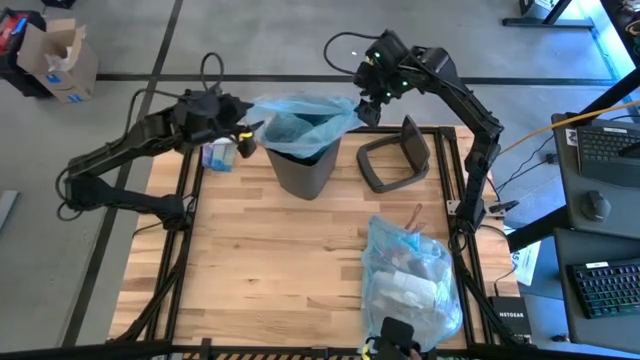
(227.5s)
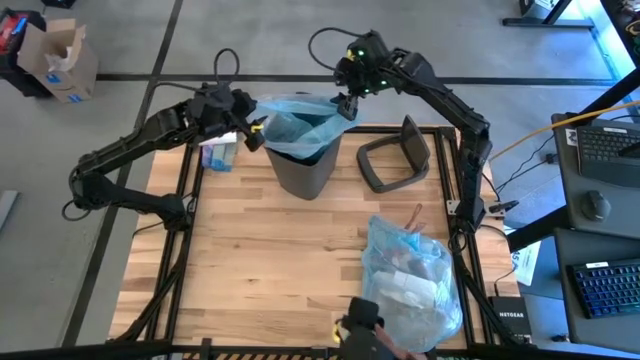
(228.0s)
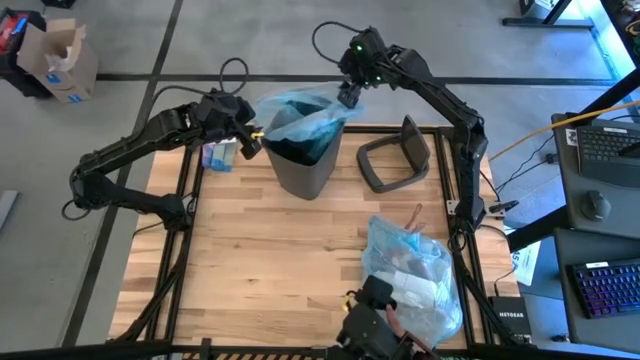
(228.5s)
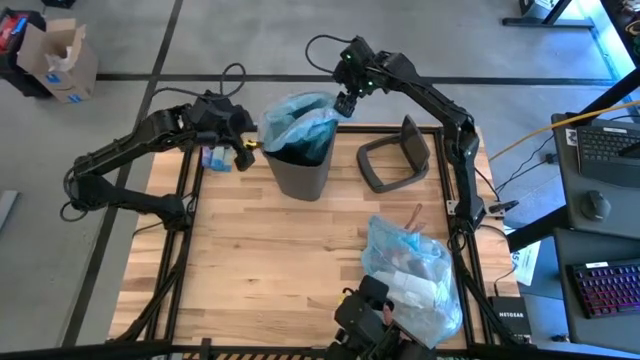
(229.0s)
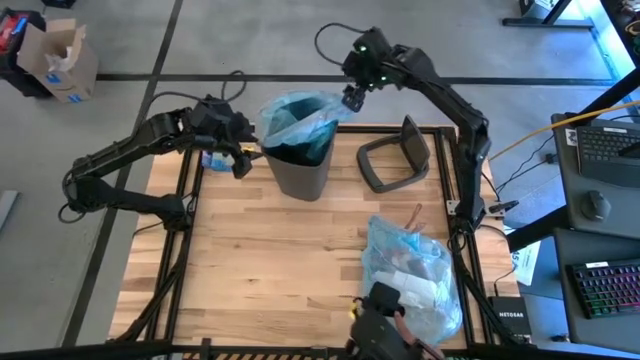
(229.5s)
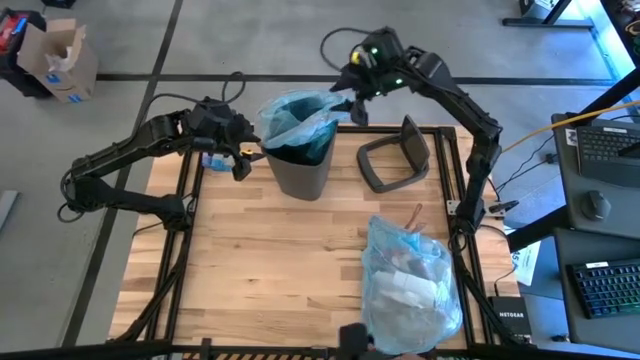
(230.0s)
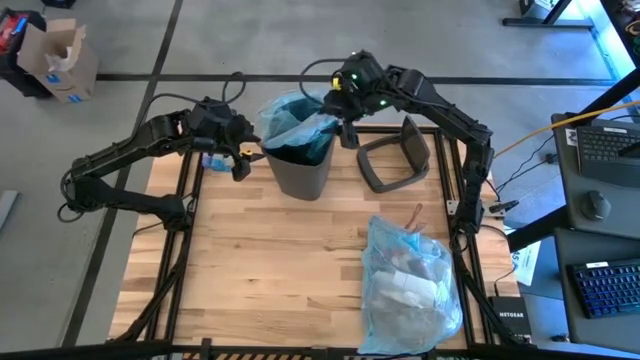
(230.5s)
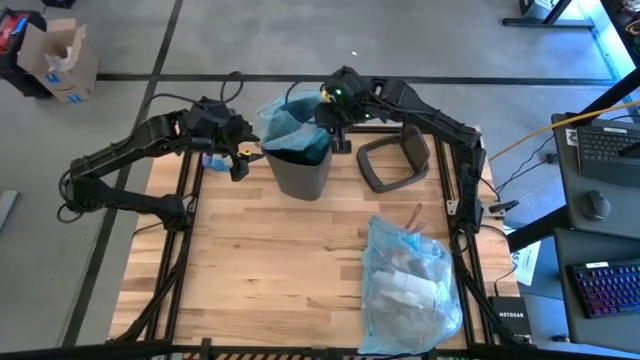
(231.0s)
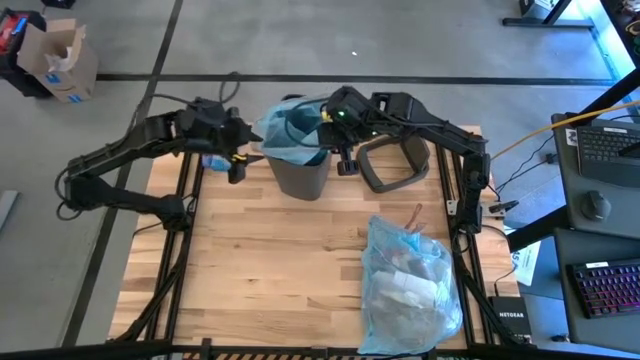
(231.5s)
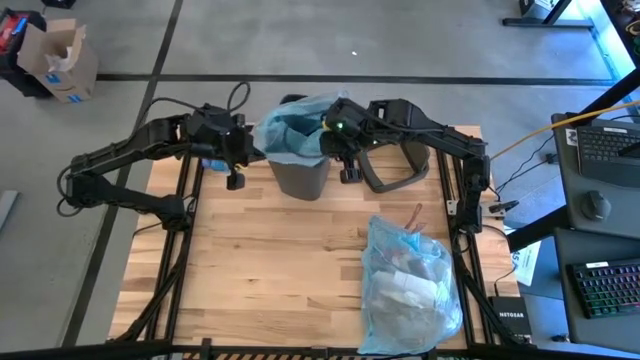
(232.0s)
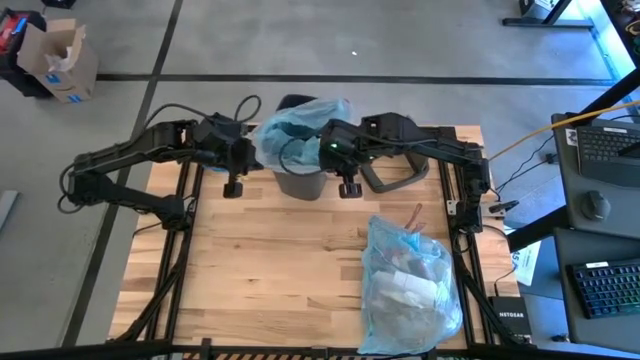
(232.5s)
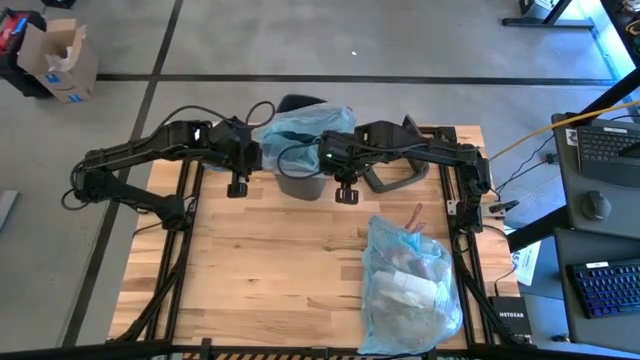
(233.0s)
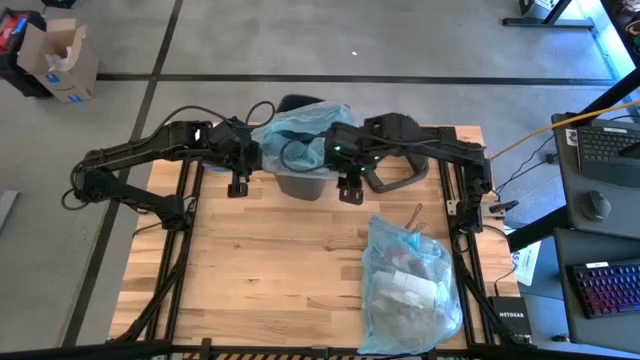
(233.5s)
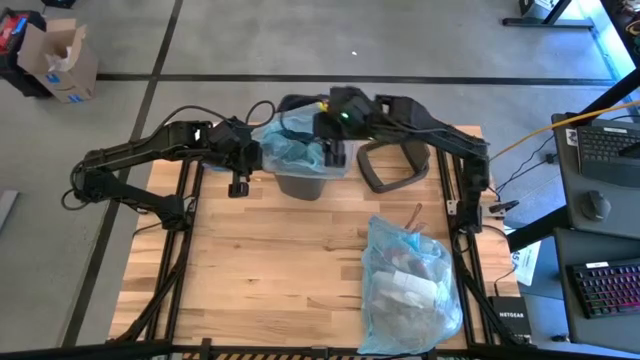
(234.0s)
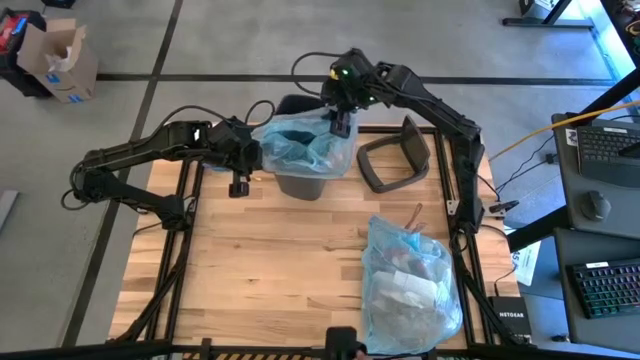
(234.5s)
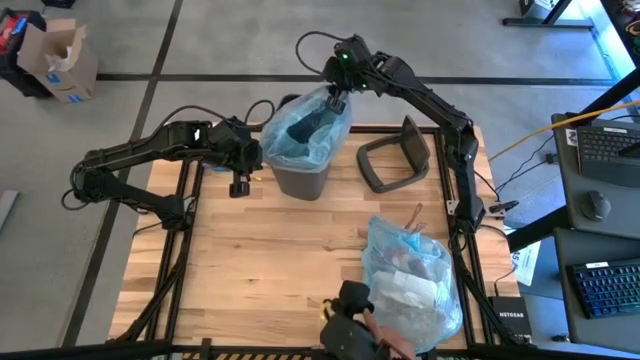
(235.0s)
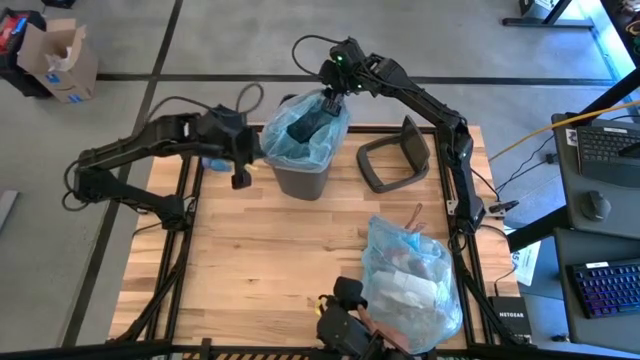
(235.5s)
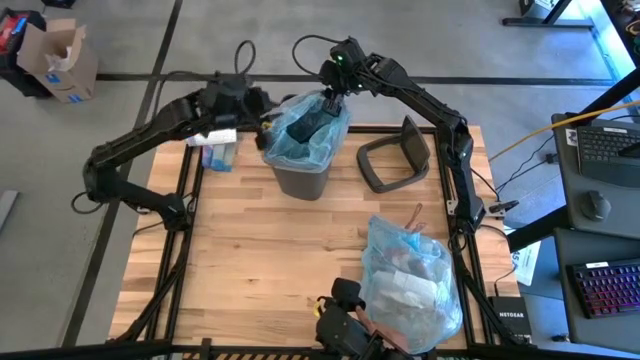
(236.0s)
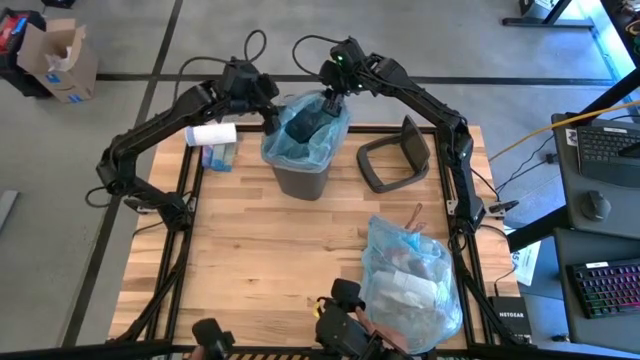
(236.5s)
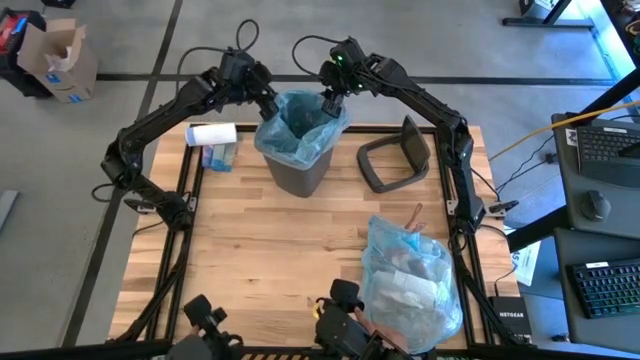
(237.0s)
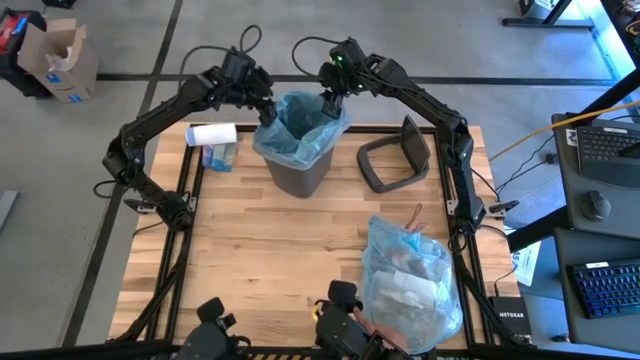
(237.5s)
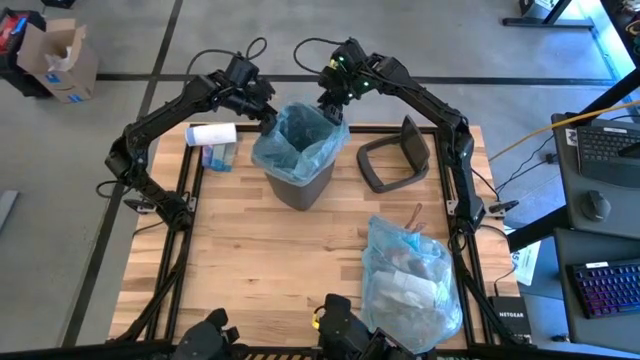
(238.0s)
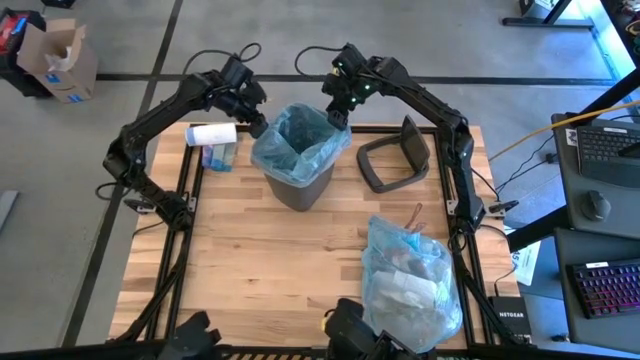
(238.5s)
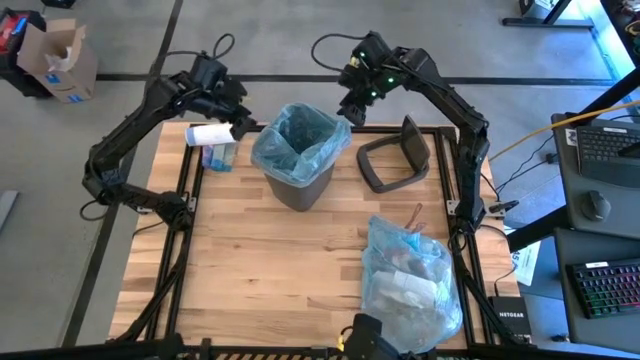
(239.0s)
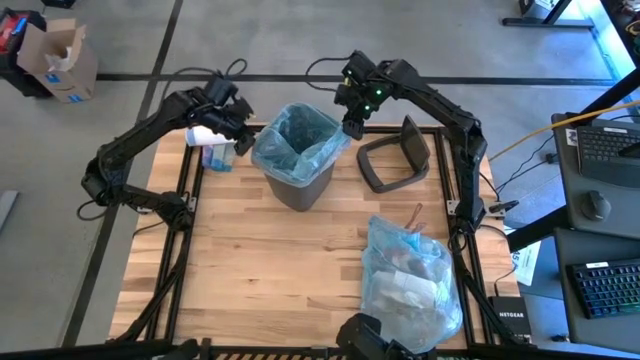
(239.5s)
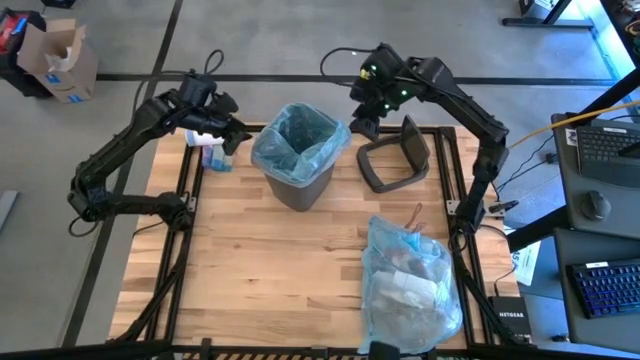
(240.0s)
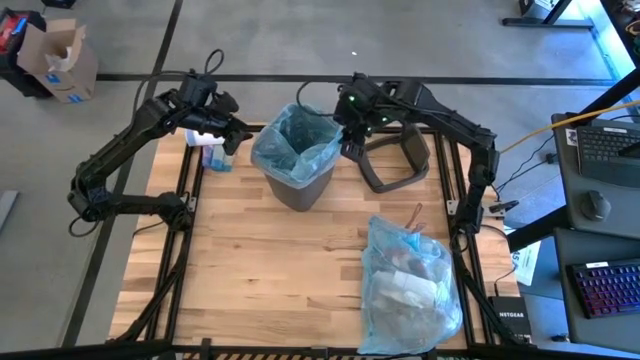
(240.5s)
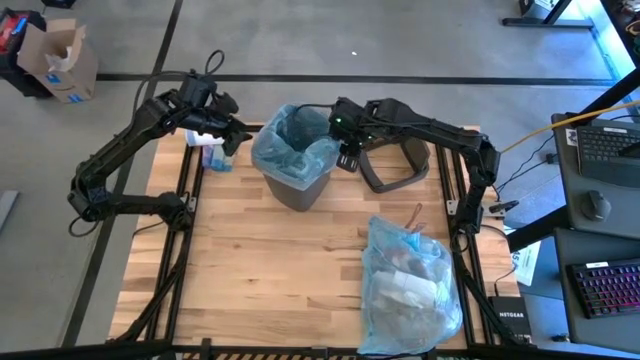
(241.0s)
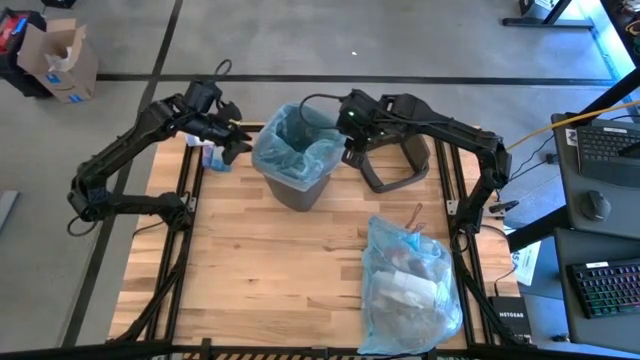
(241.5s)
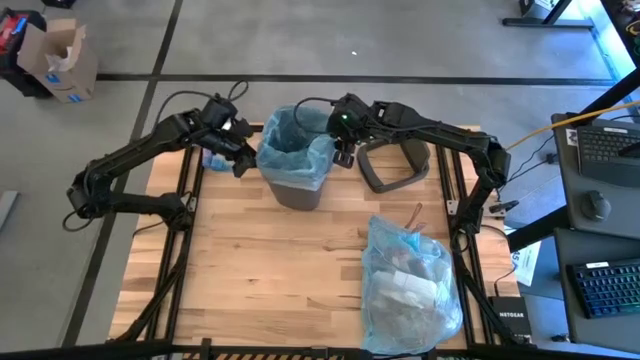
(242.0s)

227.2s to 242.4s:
Task: Pick and place trash into bin
Insert the new empty trash bag into the trash bin

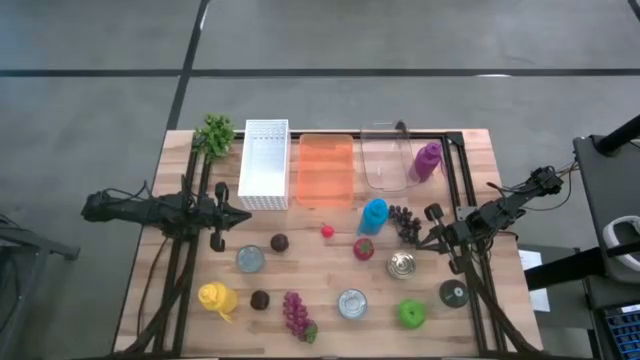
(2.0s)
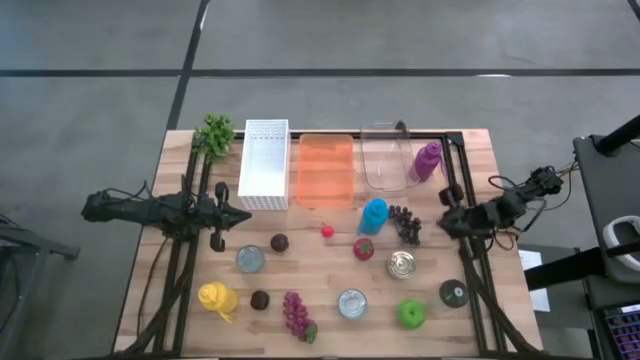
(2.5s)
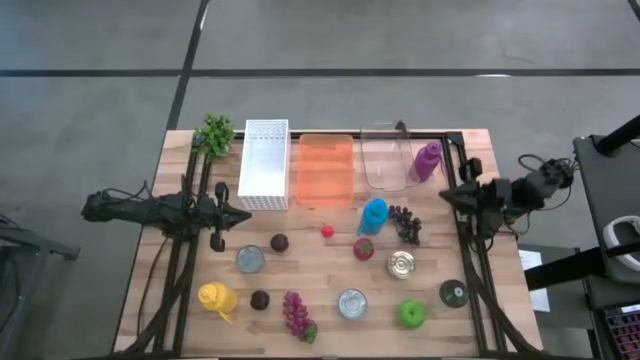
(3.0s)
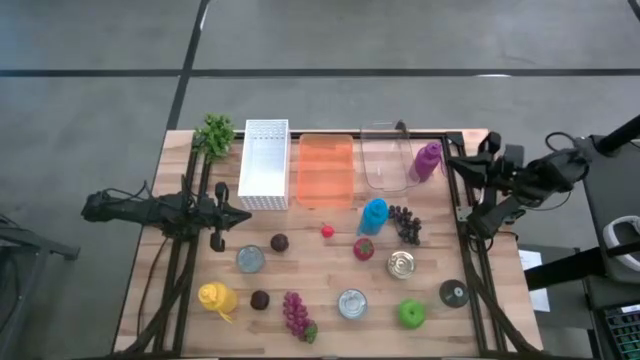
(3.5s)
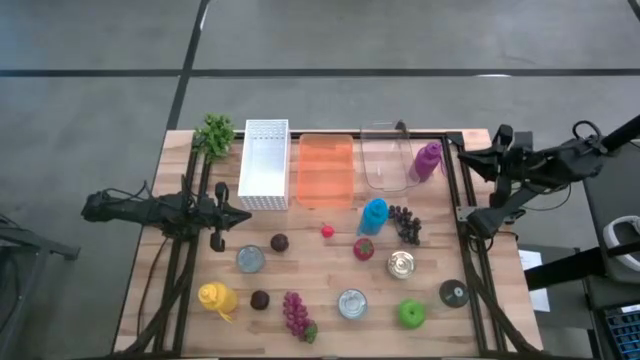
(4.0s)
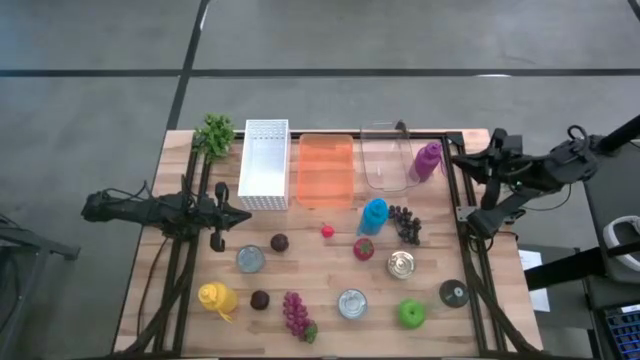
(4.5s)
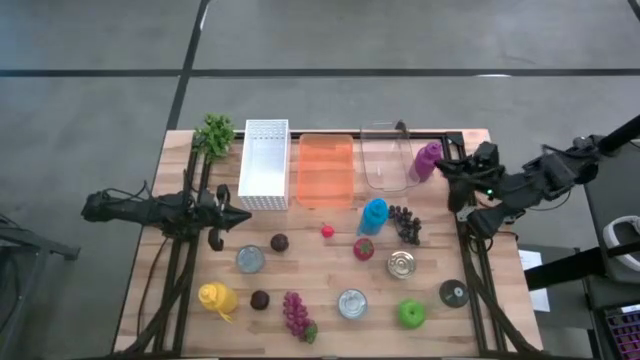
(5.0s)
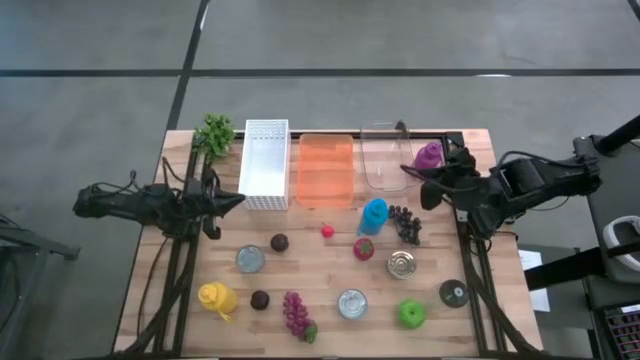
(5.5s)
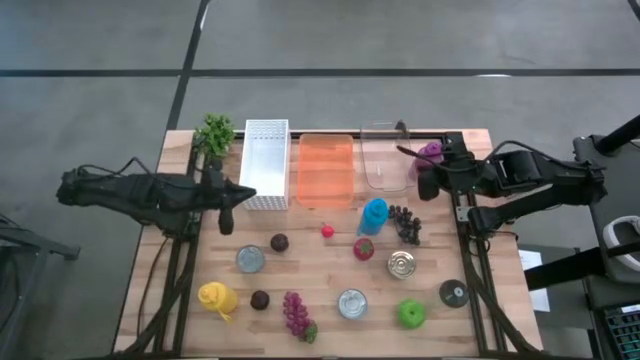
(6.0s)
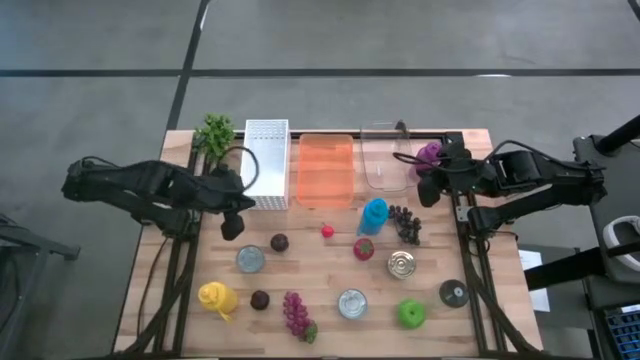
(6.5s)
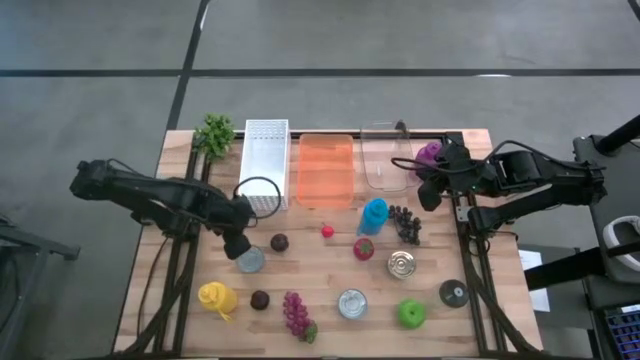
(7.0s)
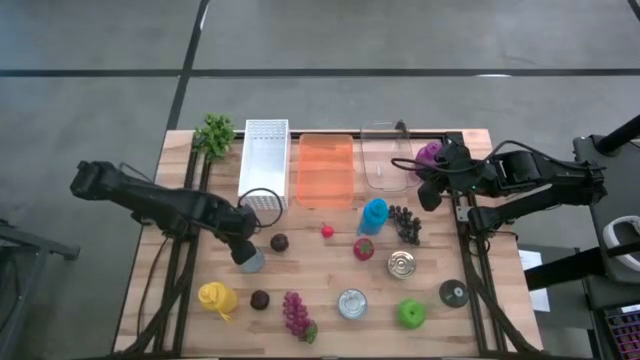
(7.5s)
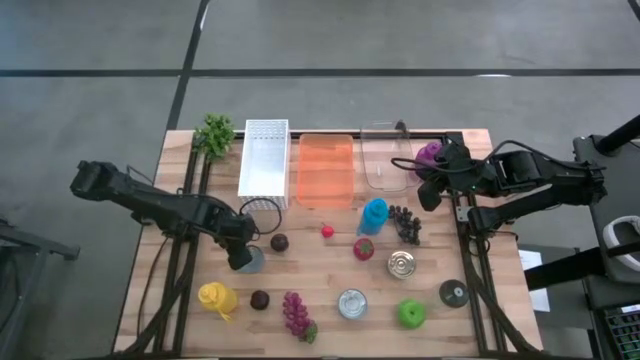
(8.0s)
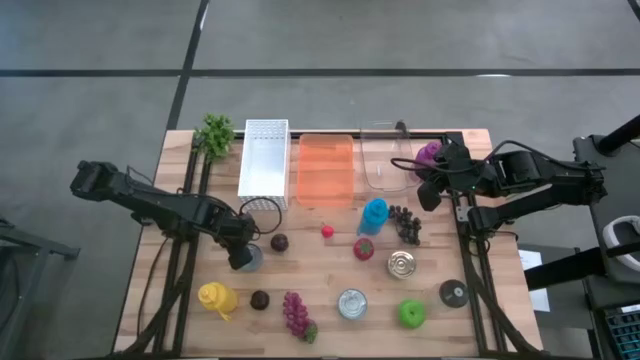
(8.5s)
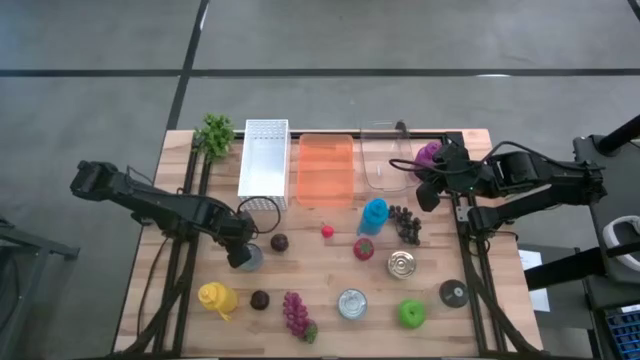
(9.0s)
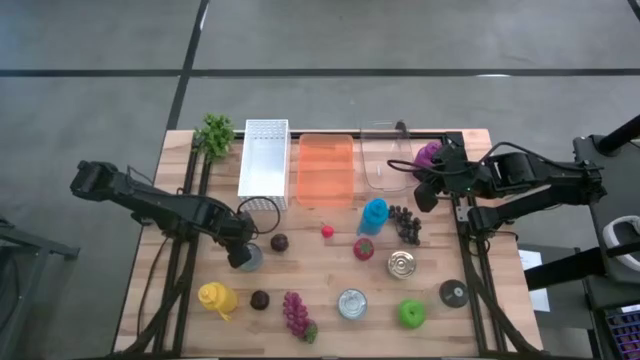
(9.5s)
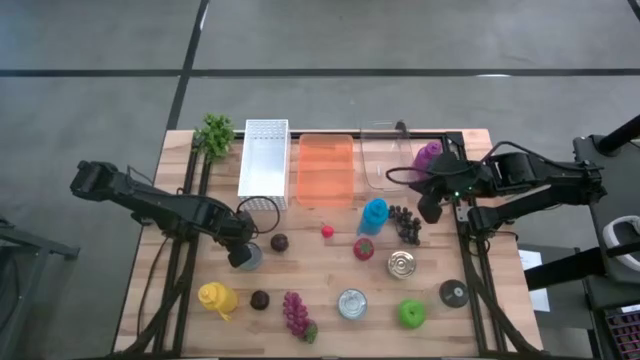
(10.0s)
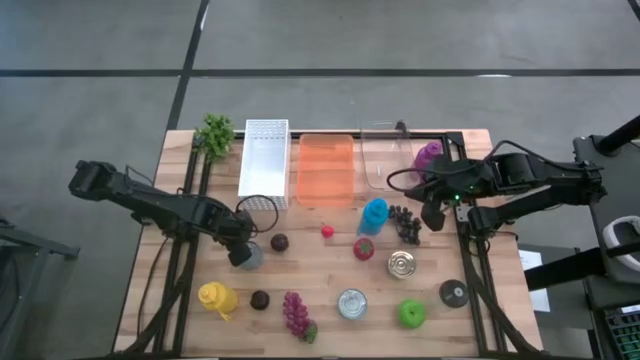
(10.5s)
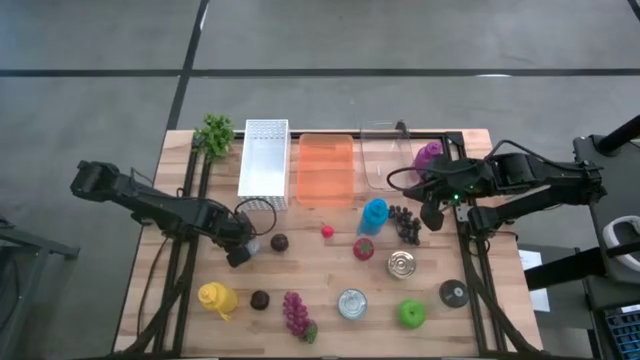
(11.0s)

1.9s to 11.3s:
Task: Pick & Place Food Item
Put the left blue tuna can into the white bin
